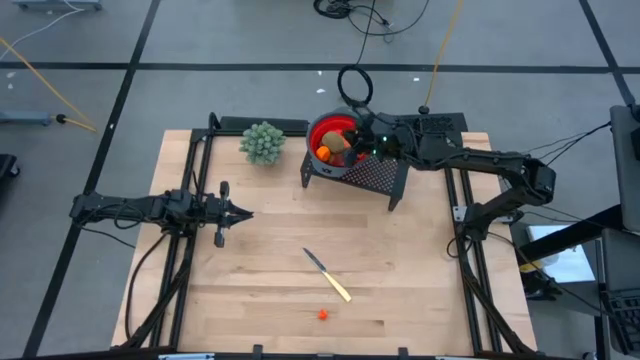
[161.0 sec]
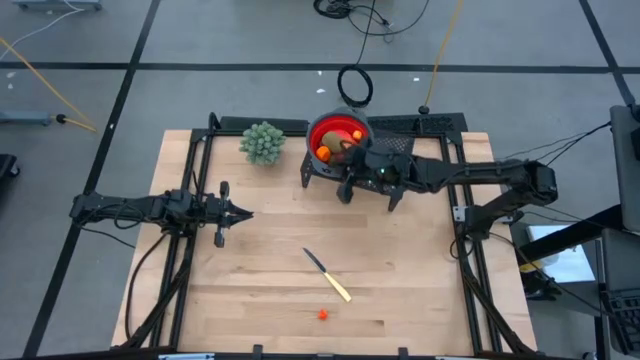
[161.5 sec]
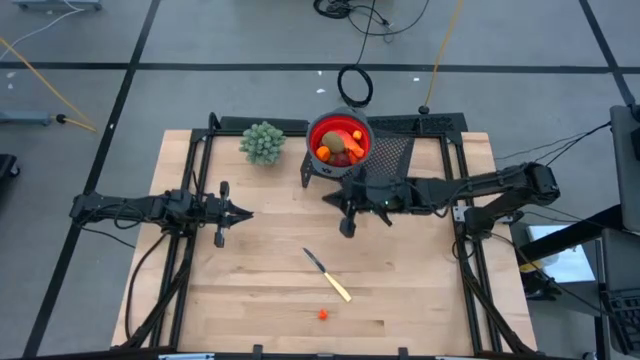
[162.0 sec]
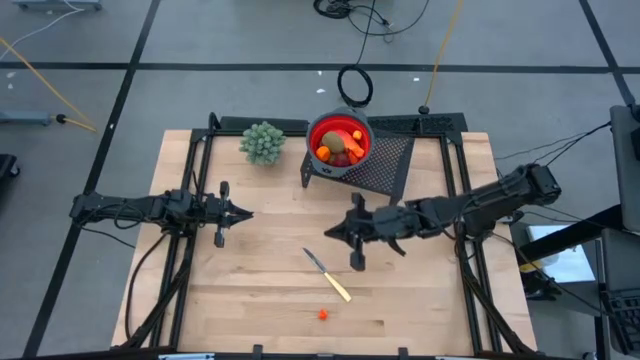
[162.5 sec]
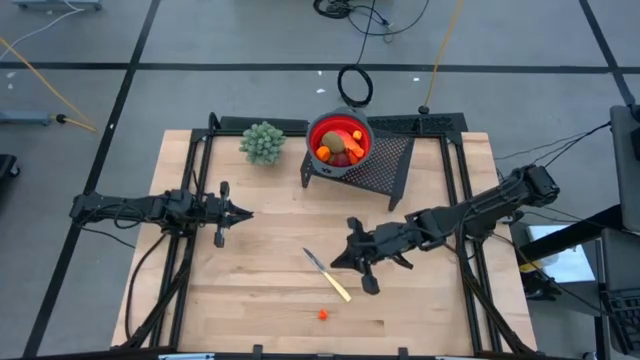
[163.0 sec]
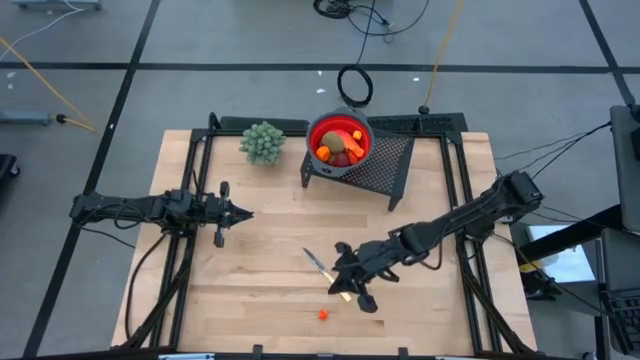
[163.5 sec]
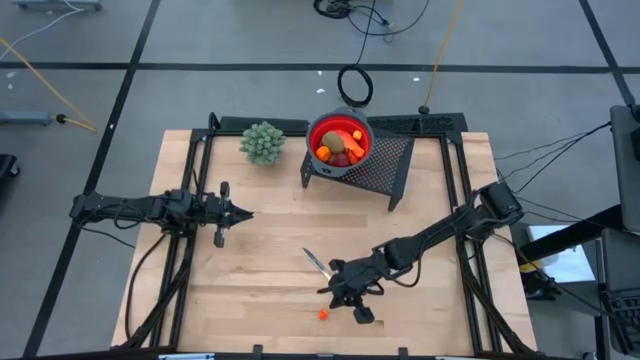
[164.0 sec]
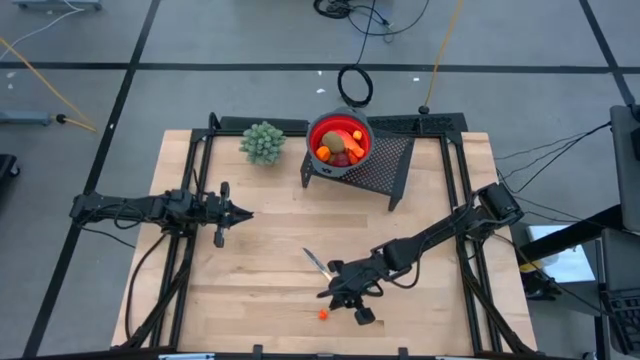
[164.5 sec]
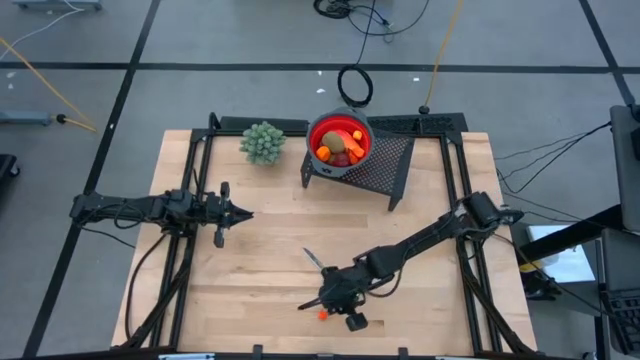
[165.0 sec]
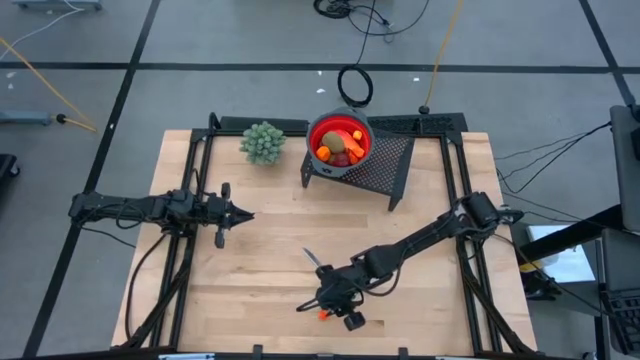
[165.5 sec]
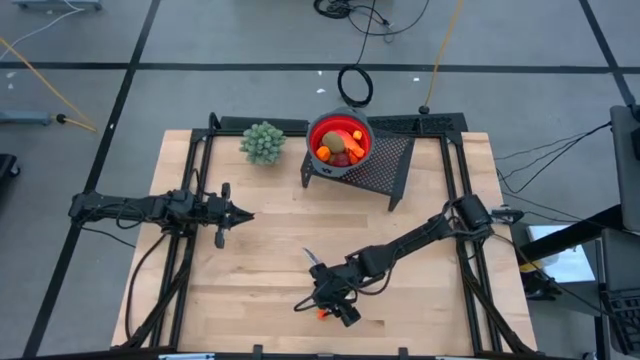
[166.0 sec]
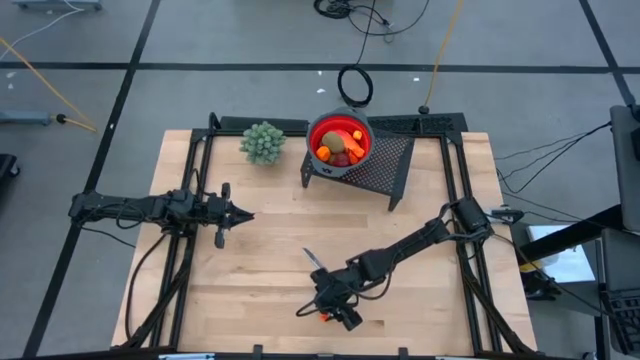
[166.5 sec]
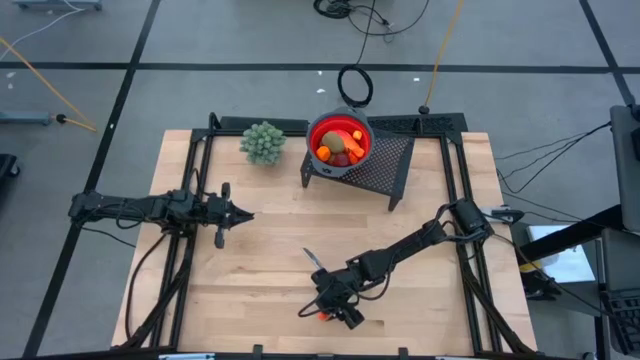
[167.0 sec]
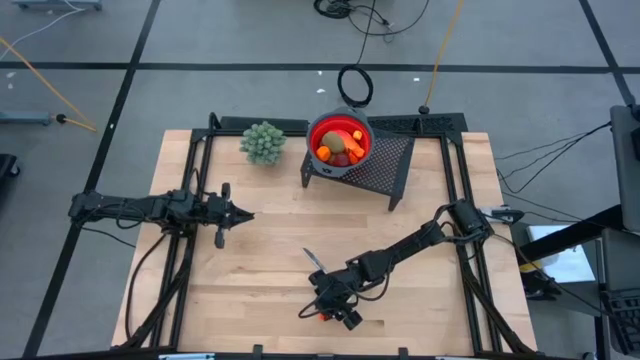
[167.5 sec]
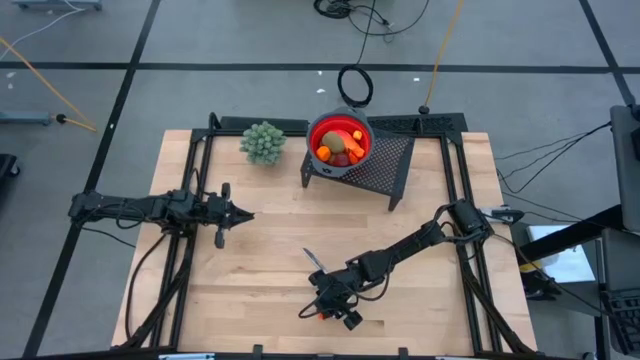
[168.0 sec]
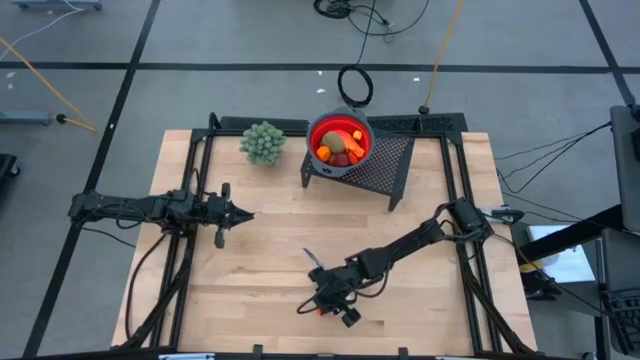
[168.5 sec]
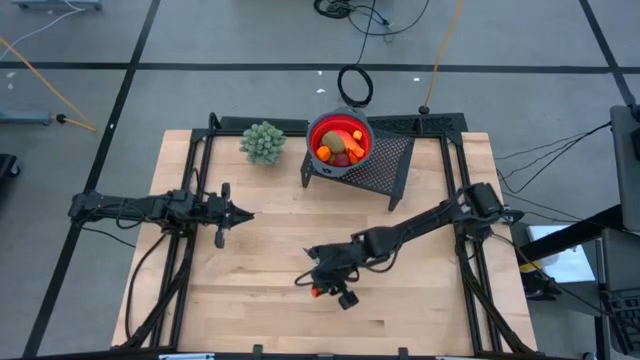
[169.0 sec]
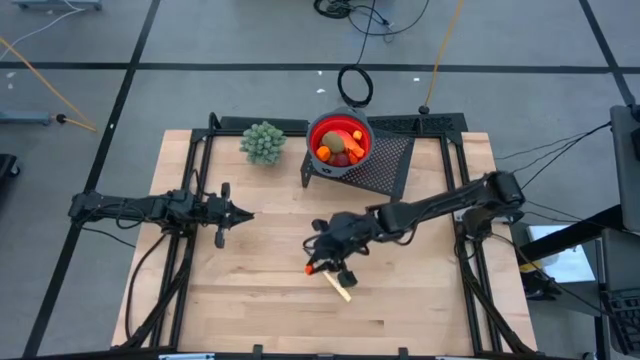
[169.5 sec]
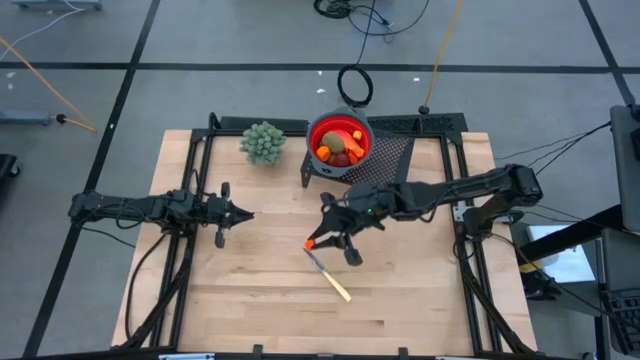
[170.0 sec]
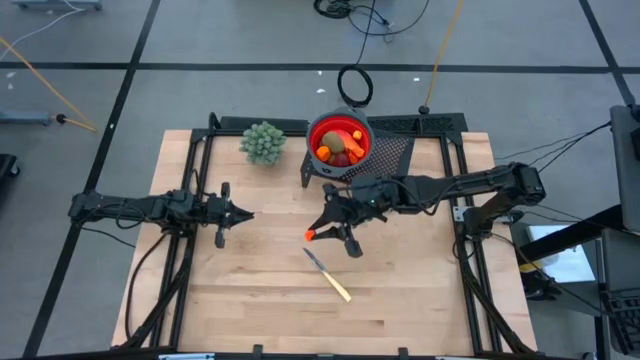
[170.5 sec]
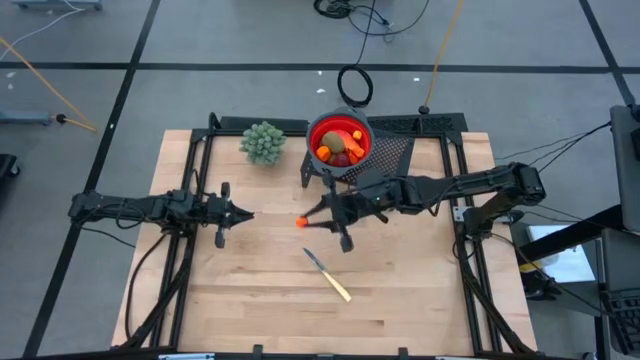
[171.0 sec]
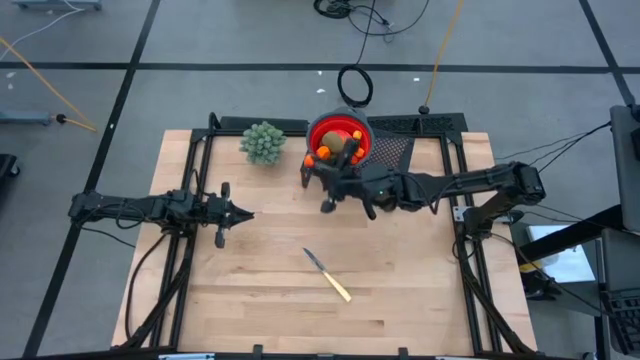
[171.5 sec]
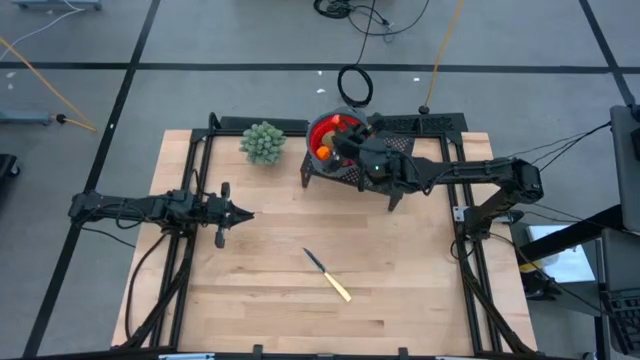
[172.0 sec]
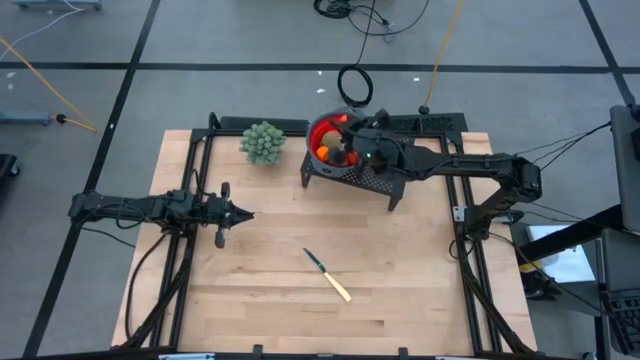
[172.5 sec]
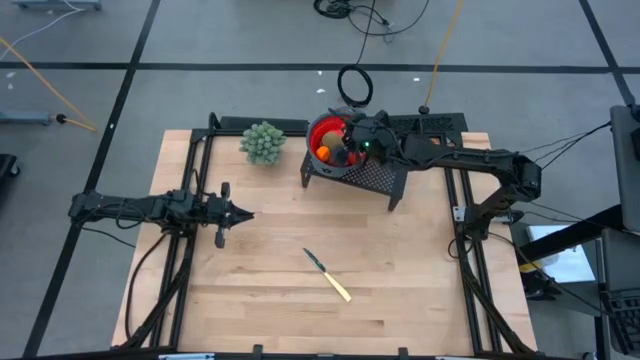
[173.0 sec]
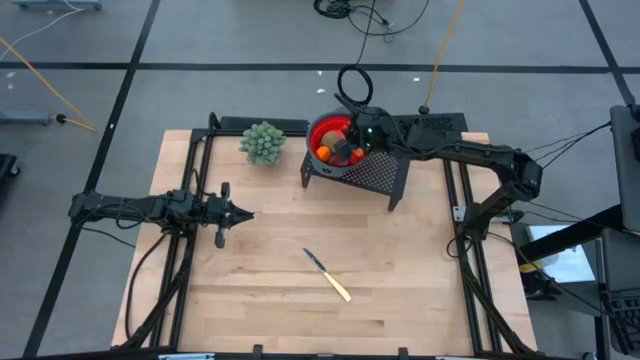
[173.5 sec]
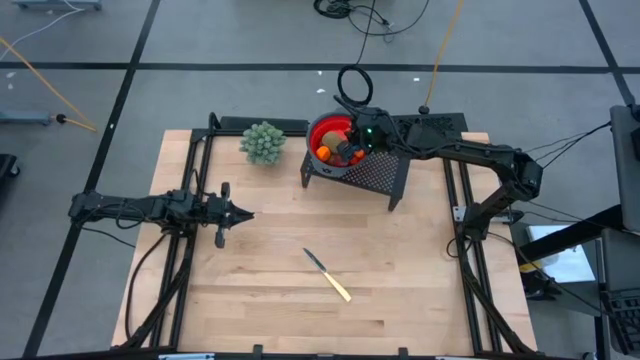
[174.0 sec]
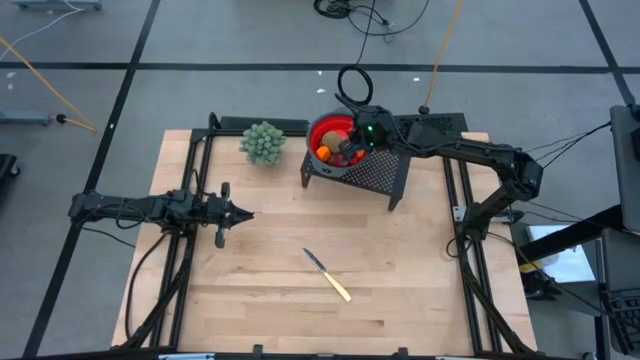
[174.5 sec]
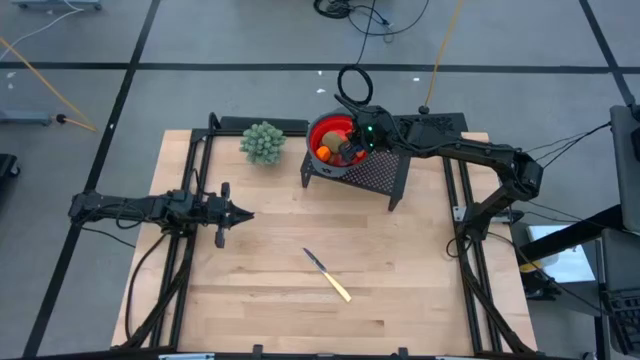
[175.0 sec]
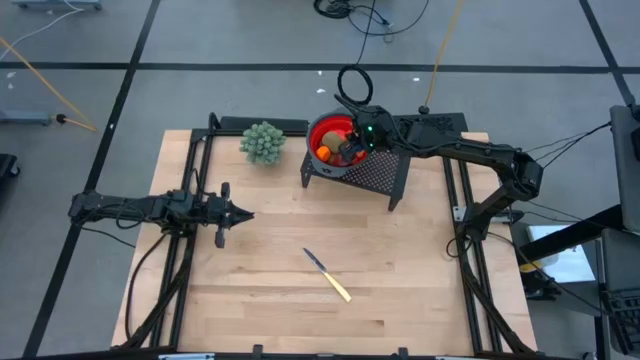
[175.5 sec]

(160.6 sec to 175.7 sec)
Task: Pick & Place Fruit
Put the yellow pear into the red strainer bowl on the shelf

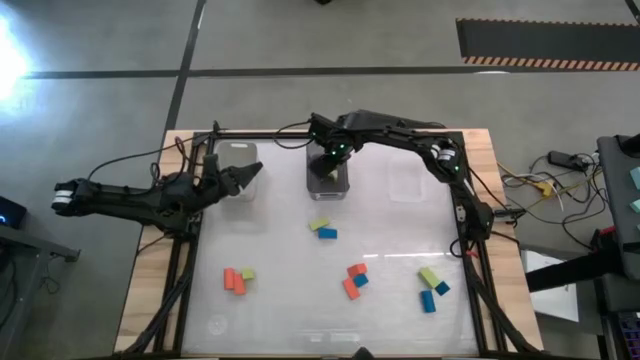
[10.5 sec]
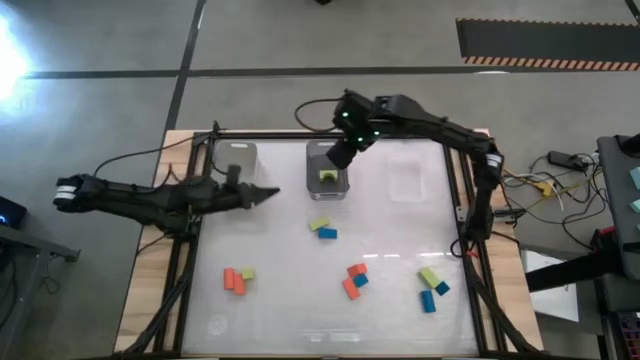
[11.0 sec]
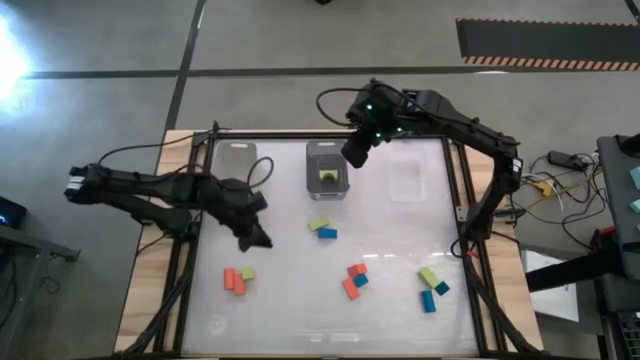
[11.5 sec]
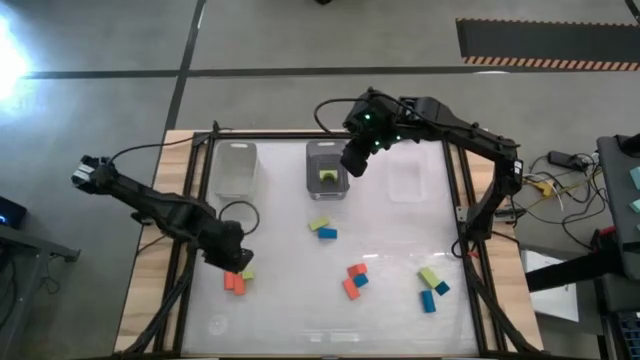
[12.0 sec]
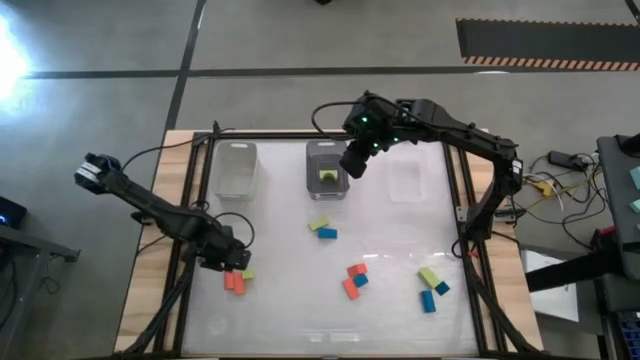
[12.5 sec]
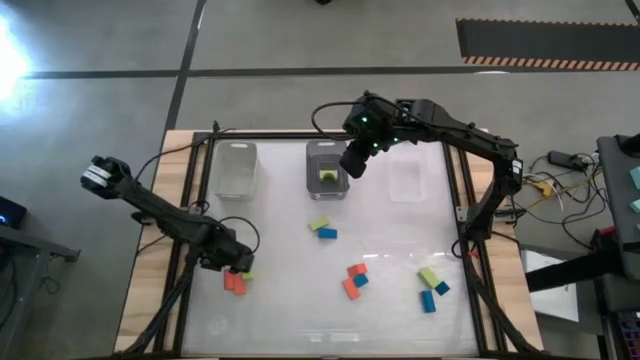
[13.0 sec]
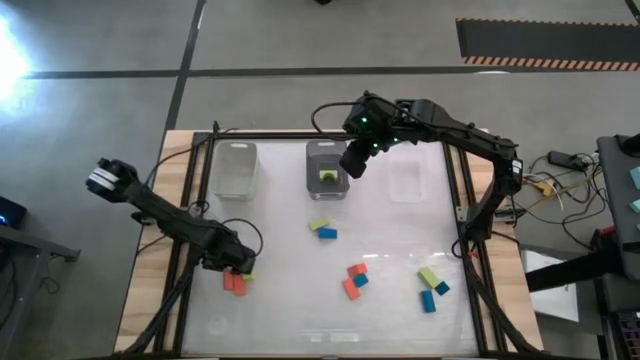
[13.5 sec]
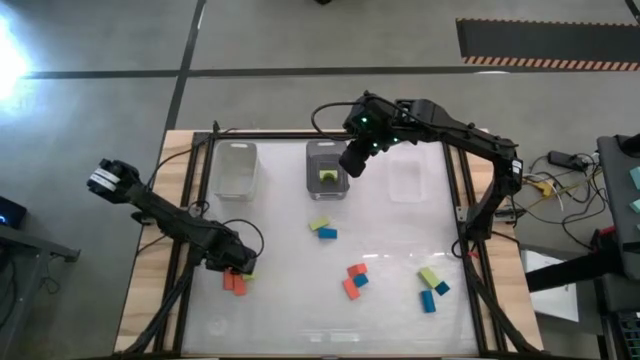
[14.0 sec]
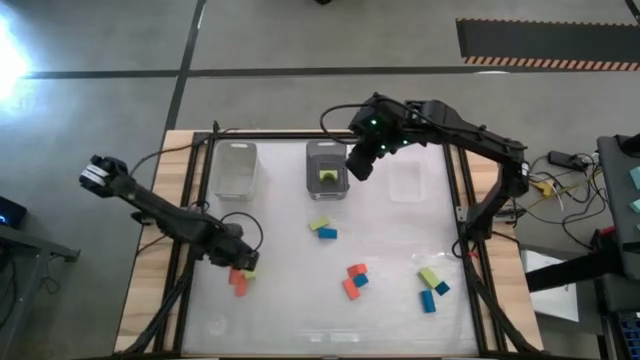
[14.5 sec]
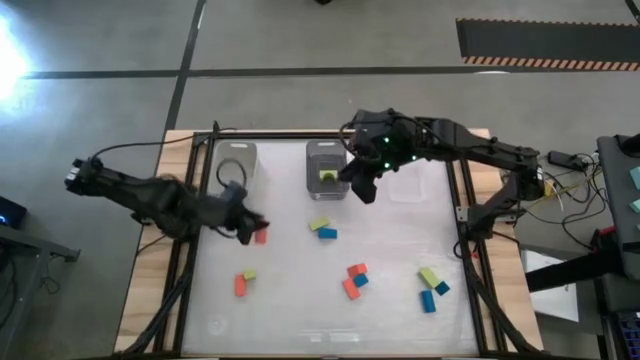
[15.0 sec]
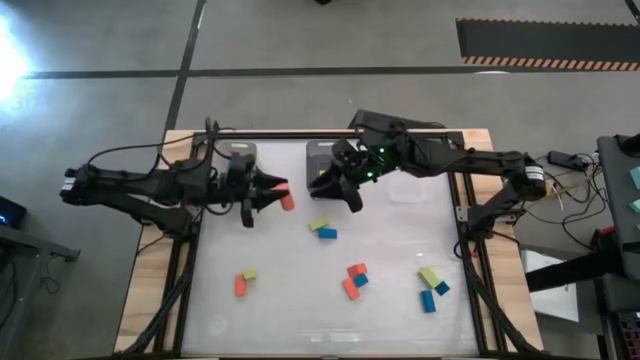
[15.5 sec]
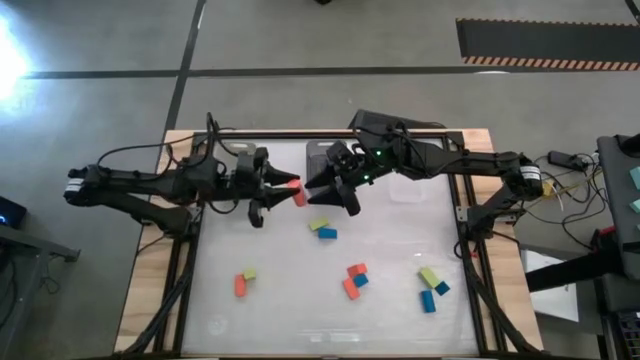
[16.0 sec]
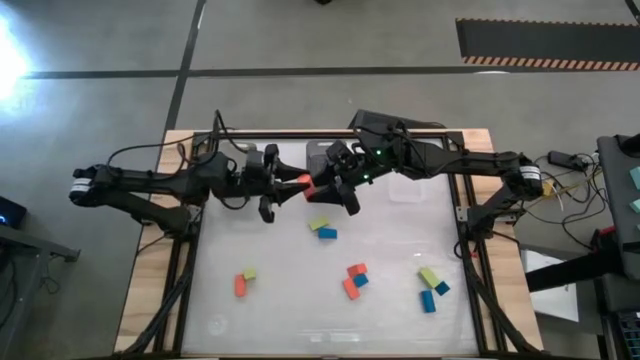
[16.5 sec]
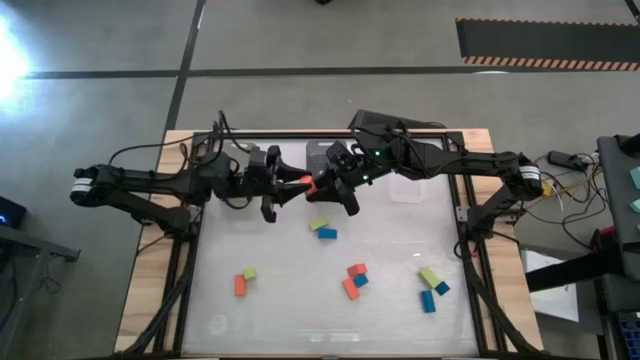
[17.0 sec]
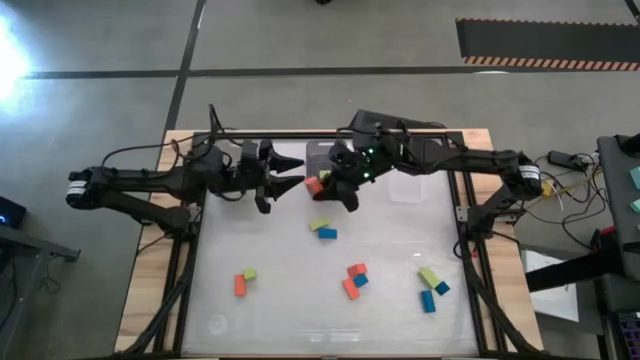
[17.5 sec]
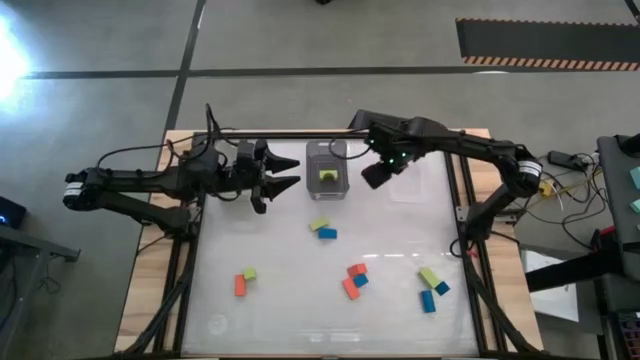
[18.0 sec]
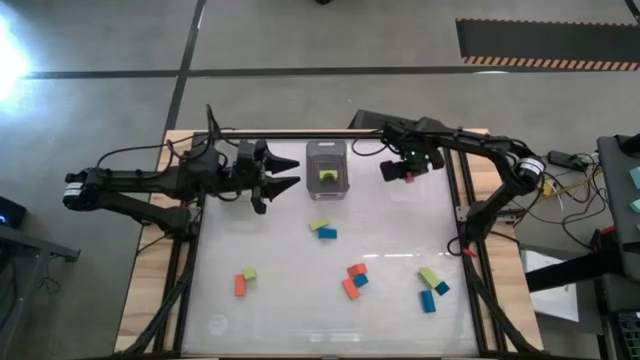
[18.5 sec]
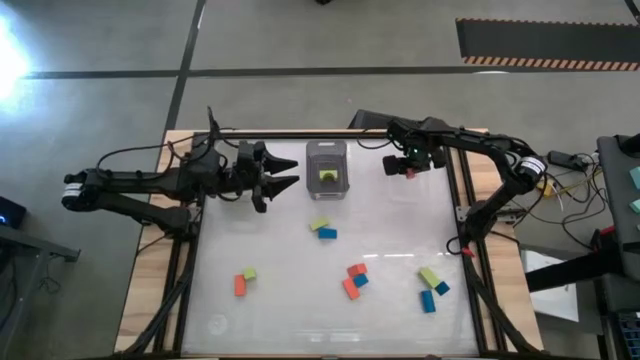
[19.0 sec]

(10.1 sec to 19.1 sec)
Task: Sort & place blocks by color
Put the orange block into the transparent bin
